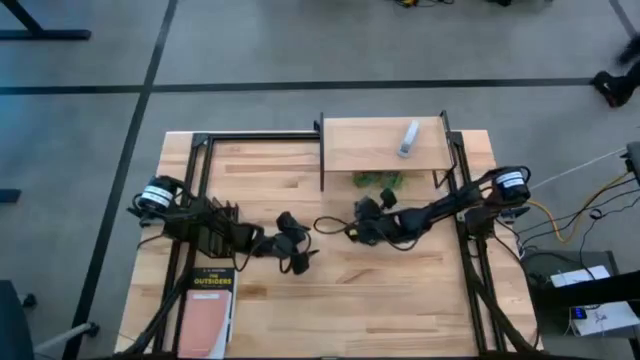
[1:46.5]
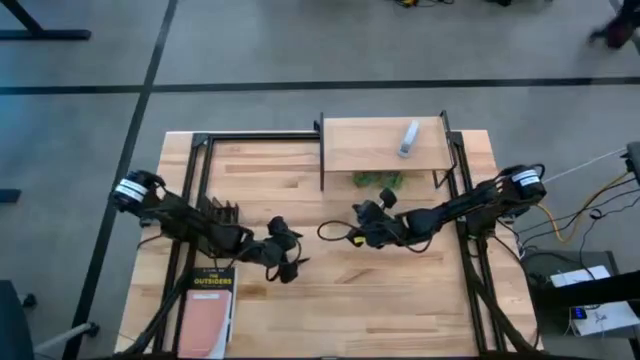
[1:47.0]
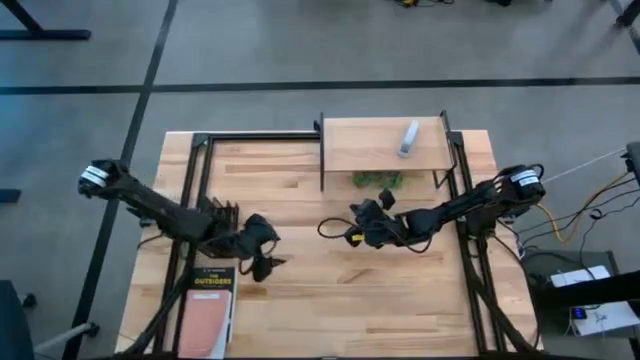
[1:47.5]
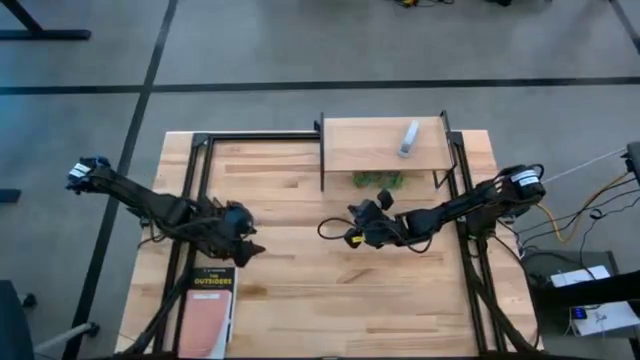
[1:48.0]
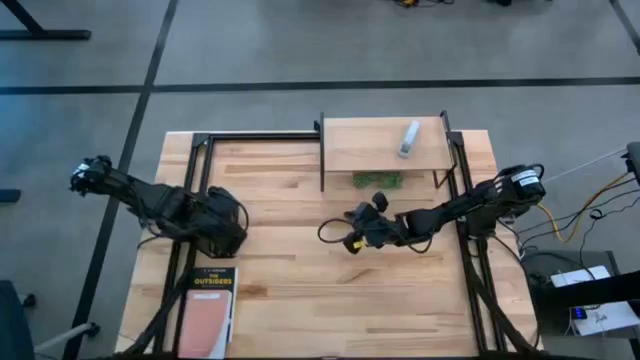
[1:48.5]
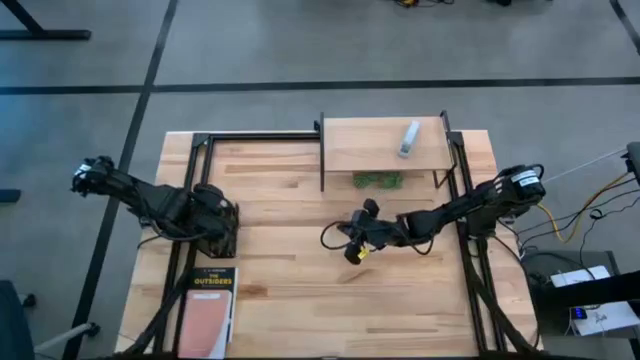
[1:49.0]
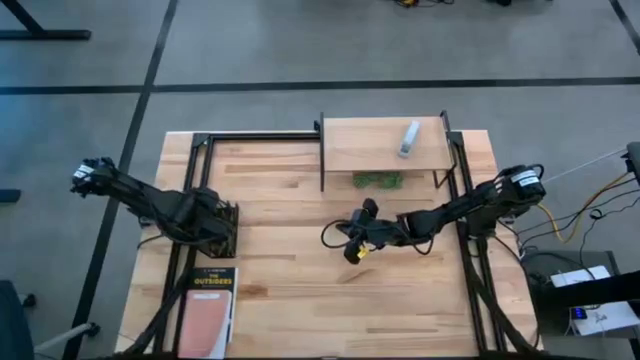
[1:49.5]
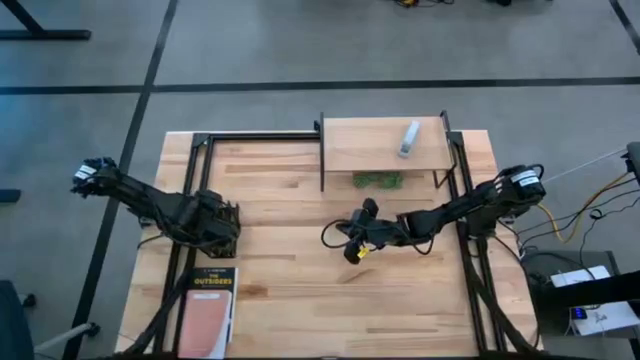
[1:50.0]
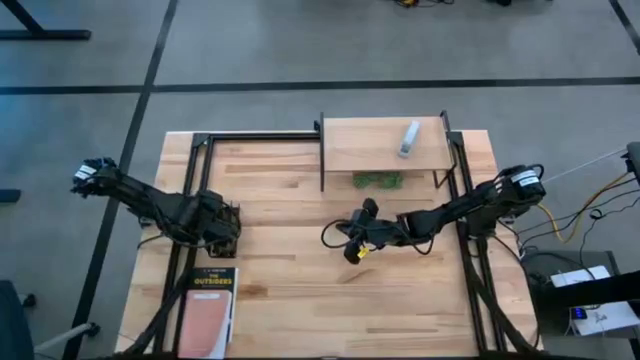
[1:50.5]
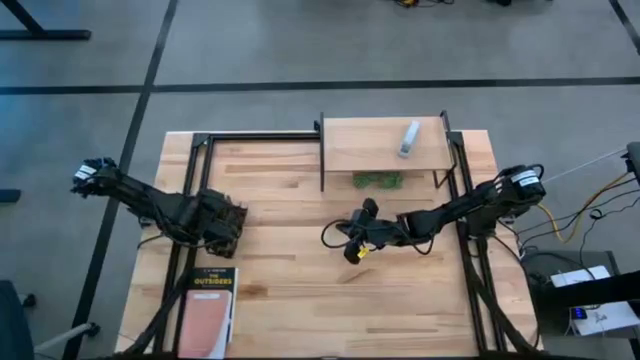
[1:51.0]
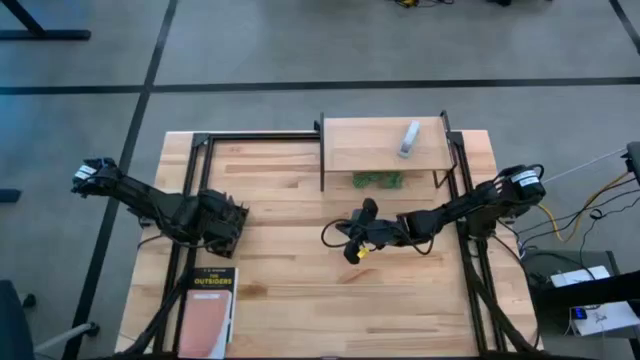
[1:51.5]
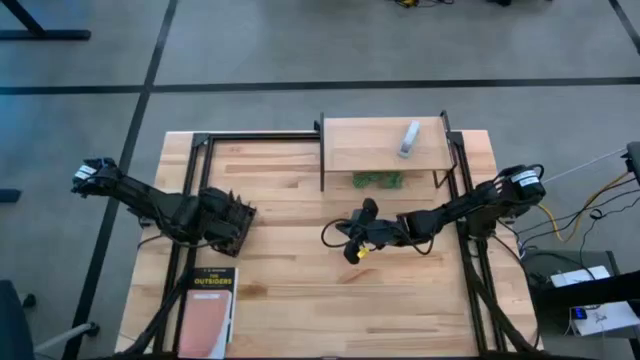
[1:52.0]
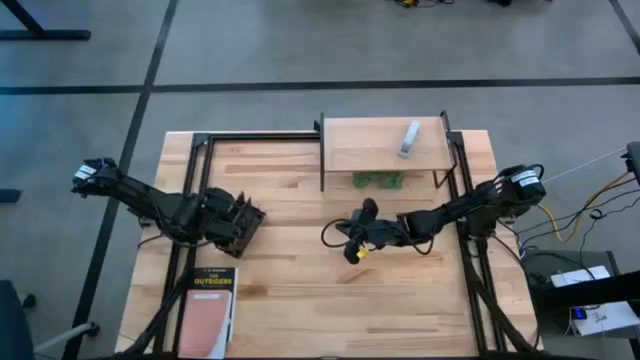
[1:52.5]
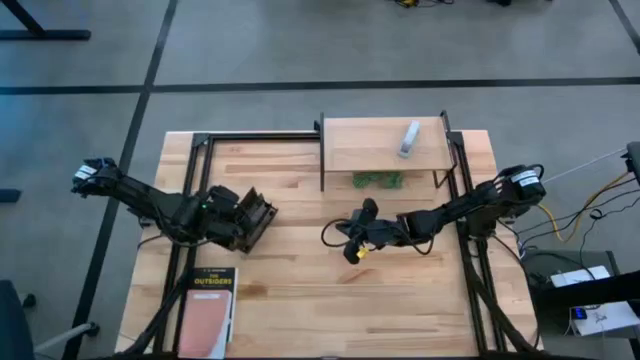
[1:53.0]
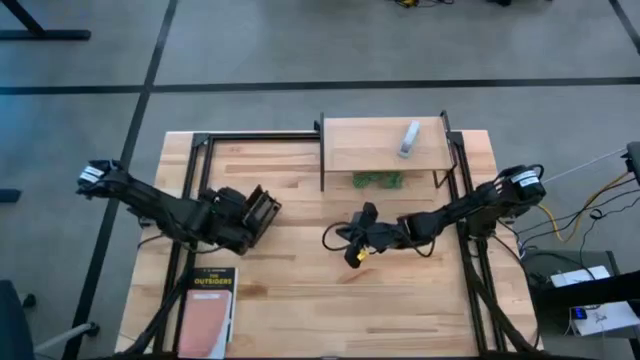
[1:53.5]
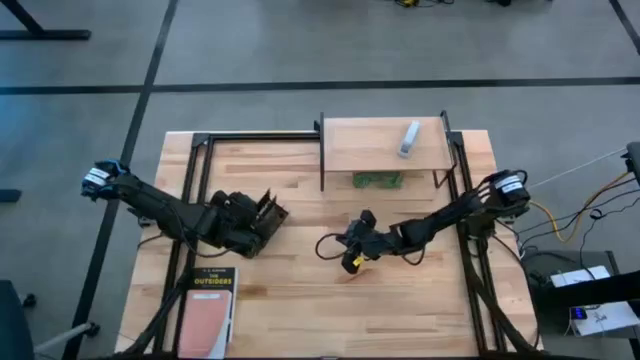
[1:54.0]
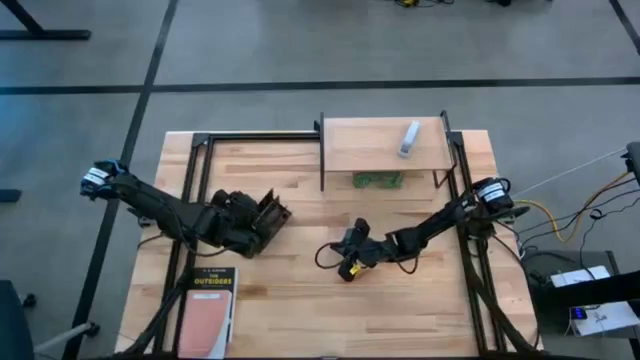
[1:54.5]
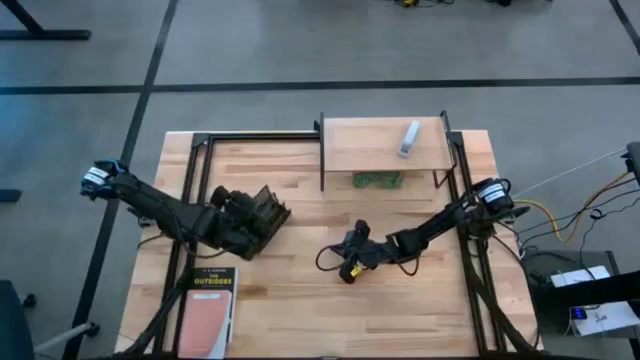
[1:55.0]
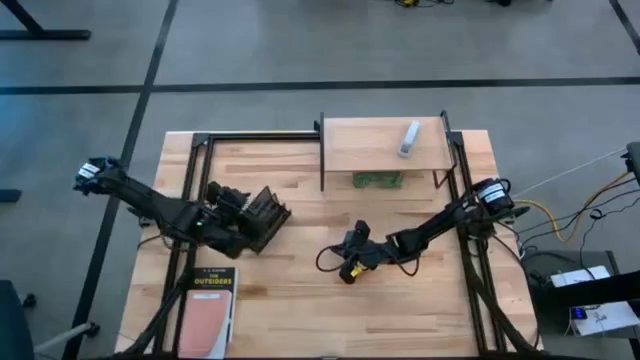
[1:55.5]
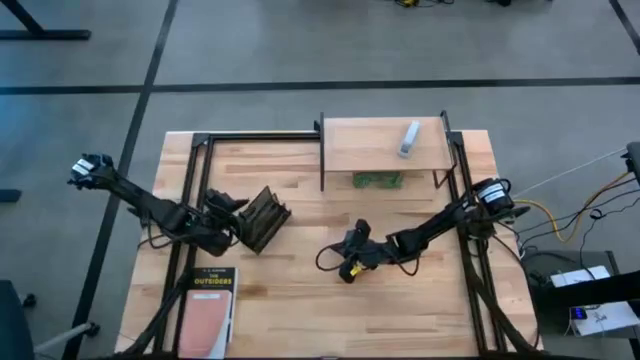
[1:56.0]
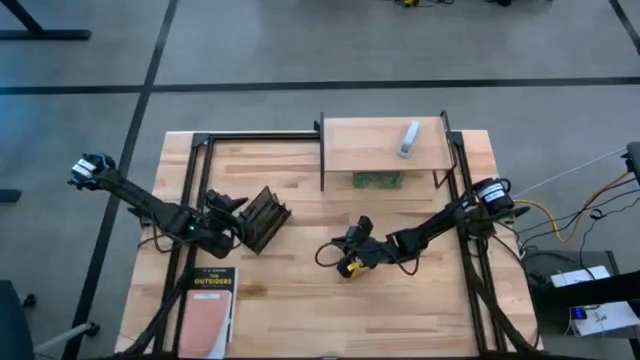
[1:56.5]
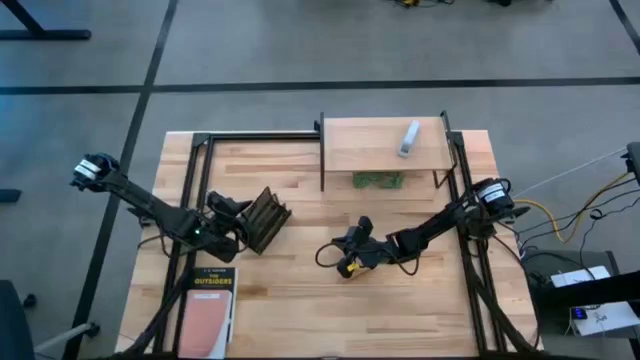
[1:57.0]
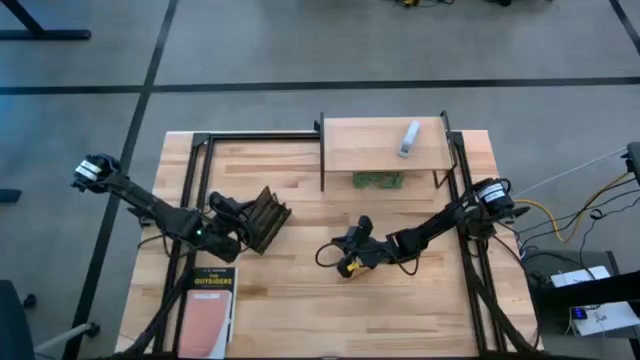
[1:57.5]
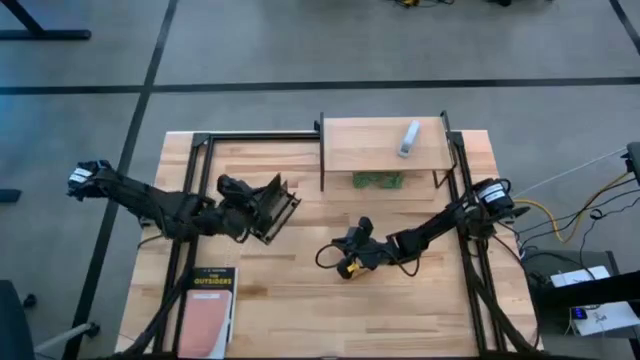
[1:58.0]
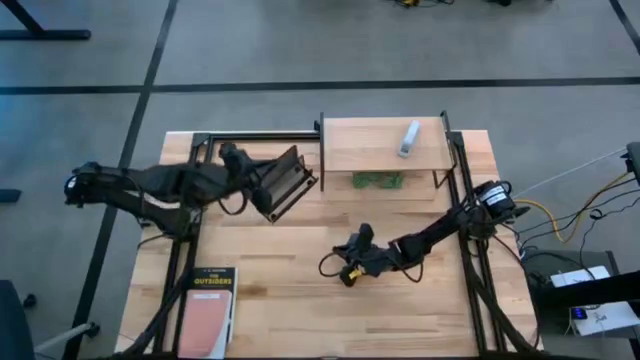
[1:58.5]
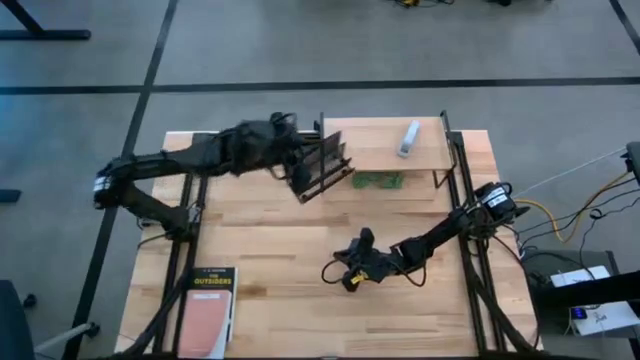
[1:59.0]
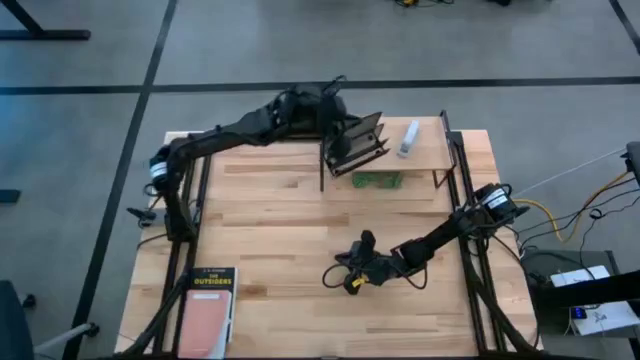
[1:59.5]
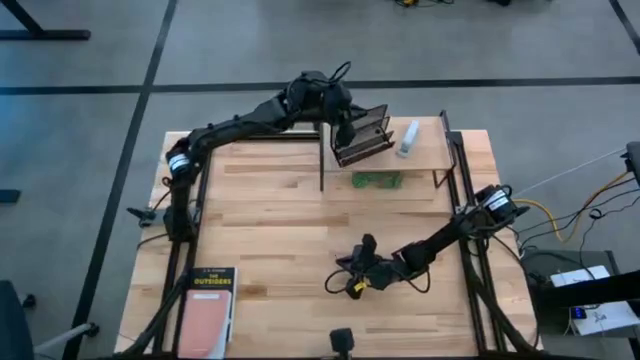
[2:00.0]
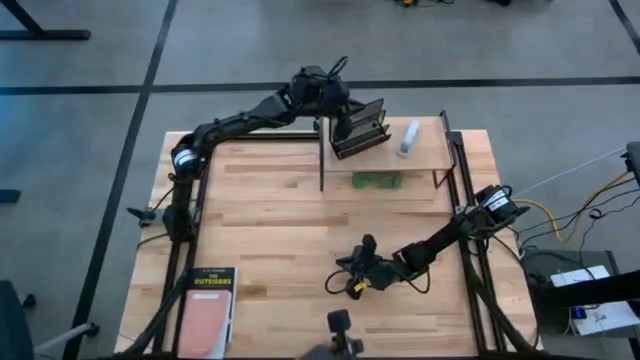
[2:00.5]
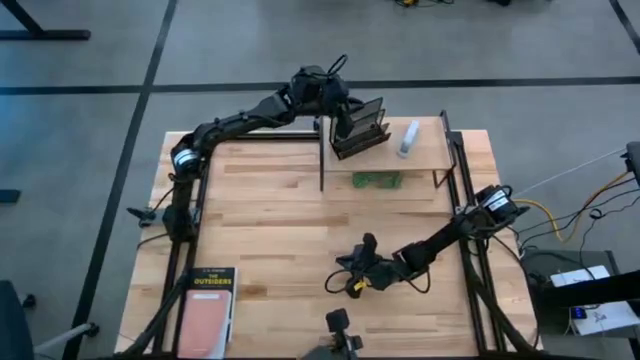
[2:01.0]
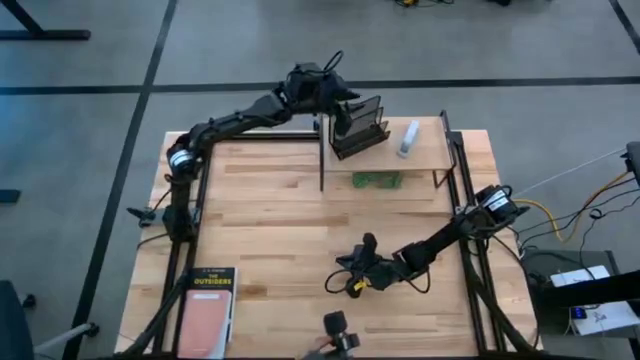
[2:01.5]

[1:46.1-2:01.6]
Task: Stock shelves
Put the black desk organizer on the shelf

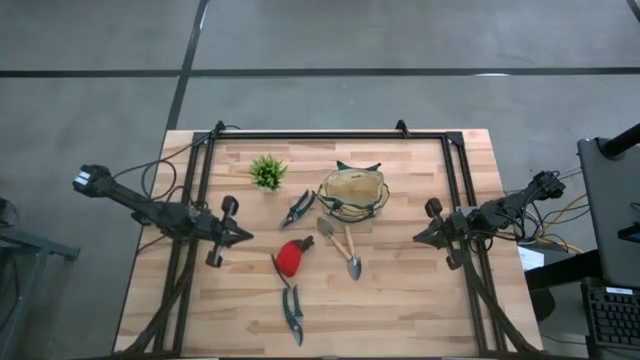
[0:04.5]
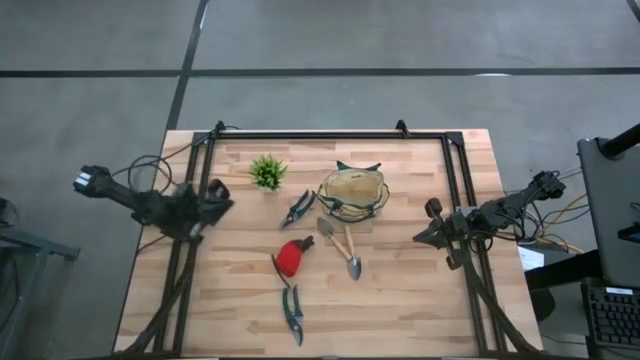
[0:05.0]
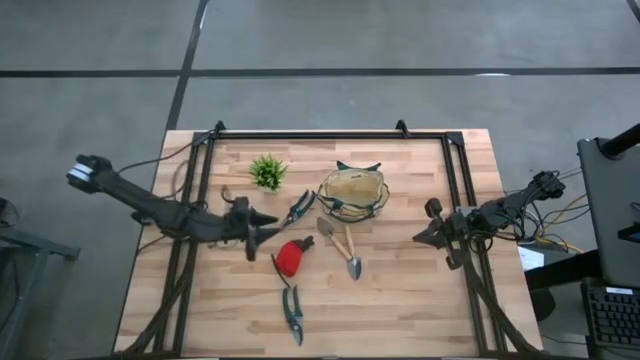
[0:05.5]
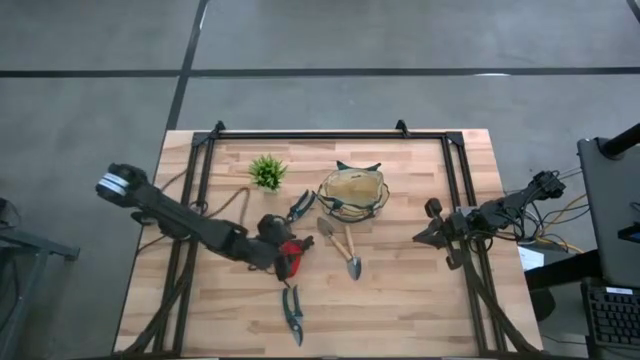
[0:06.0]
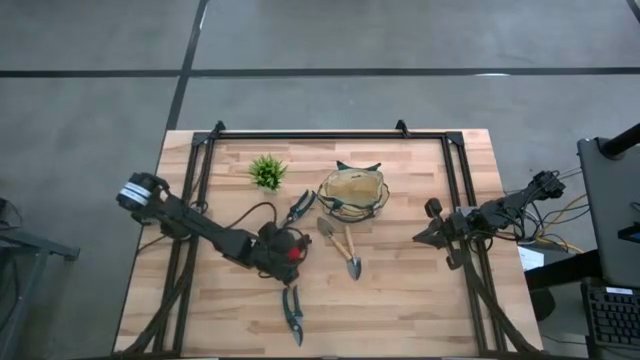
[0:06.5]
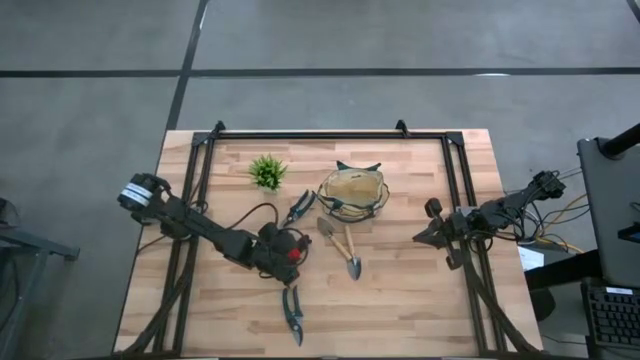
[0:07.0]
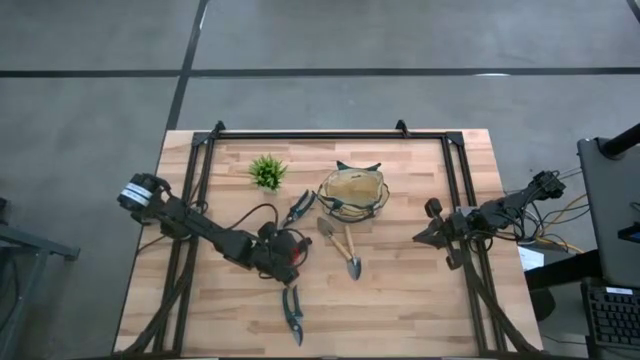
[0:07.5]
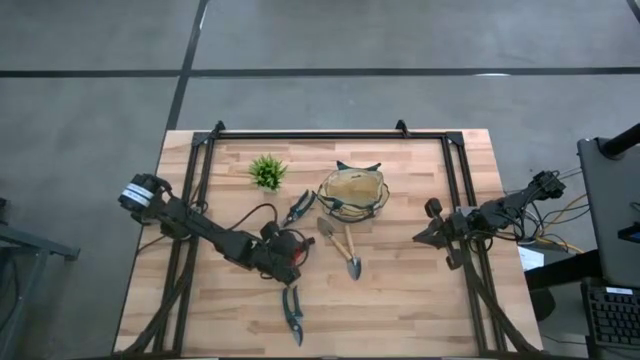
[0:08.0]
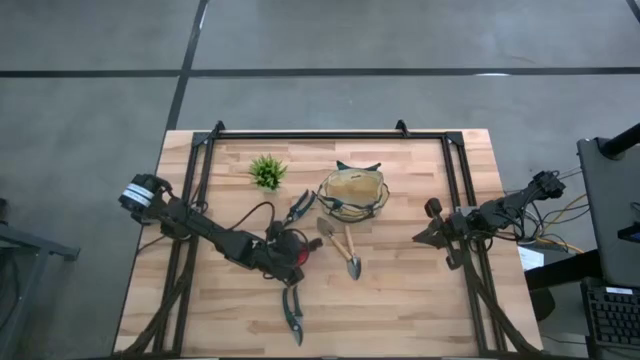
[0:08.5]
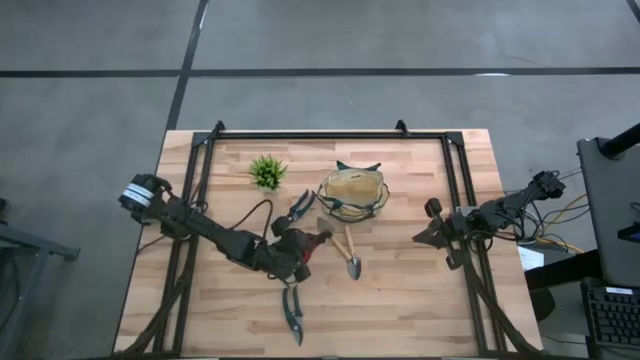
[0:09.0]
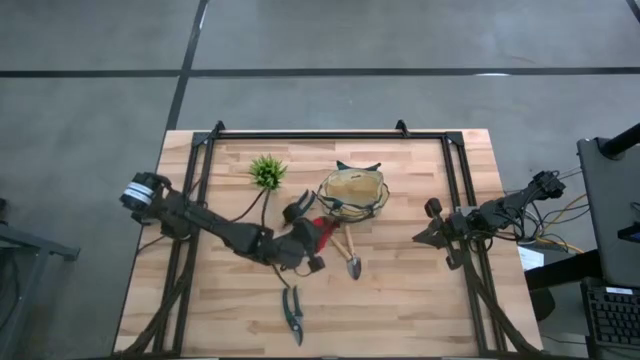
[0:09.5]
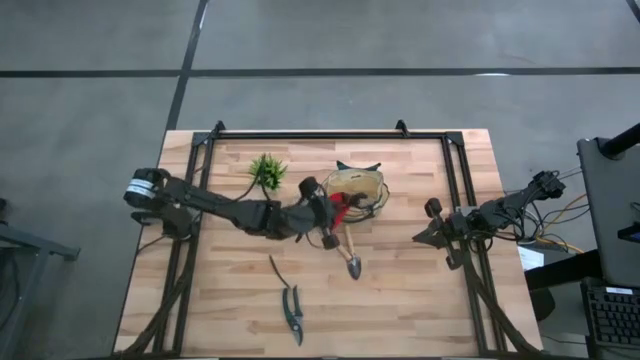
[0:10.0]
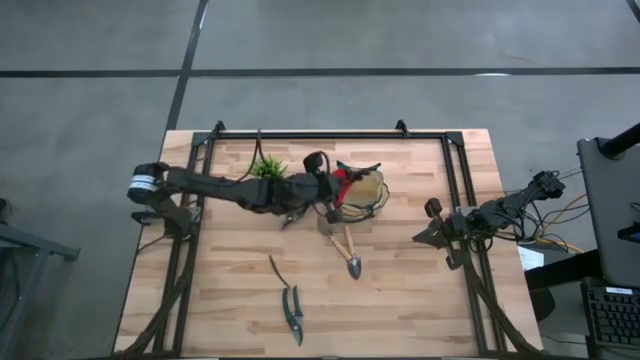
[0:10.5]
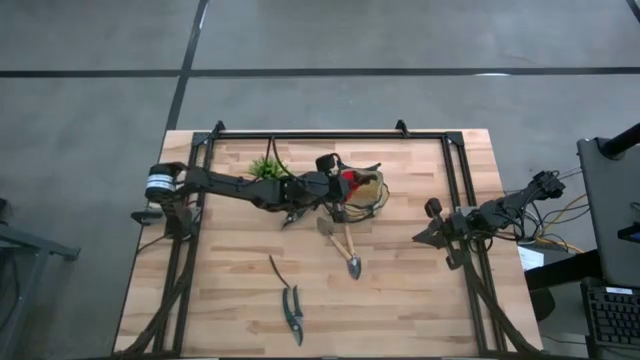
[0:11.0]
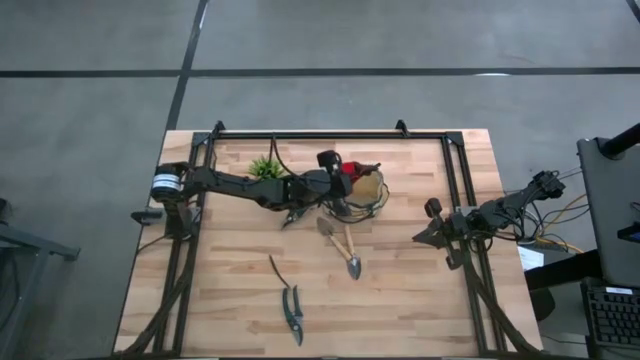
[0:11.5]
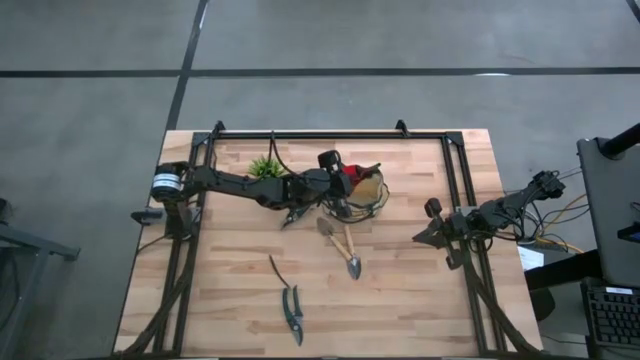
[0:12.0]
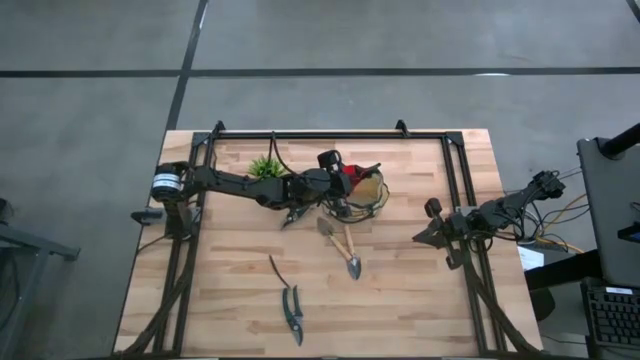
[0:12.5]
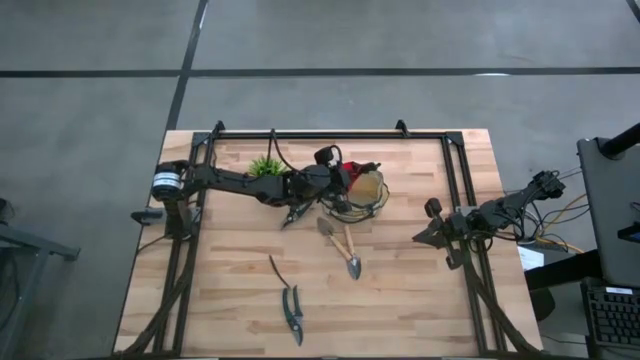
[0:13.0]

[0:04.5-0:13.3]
Task: Pick & Place Garden tools in Gardening bag
Put the red gloves into the gardening bag
